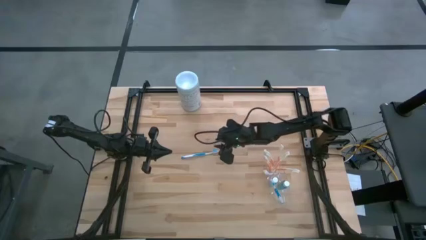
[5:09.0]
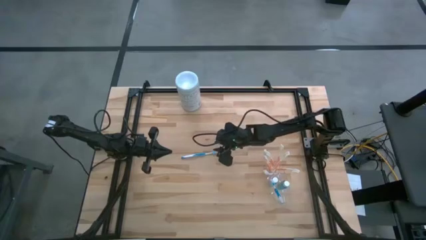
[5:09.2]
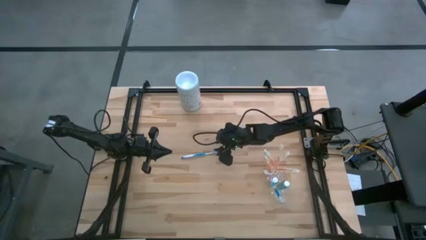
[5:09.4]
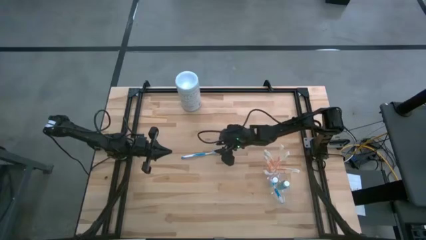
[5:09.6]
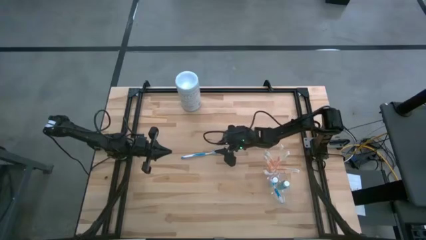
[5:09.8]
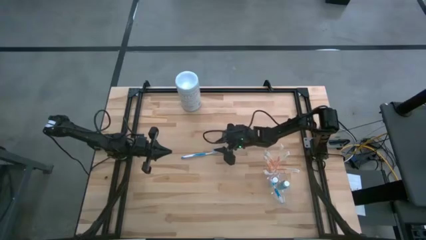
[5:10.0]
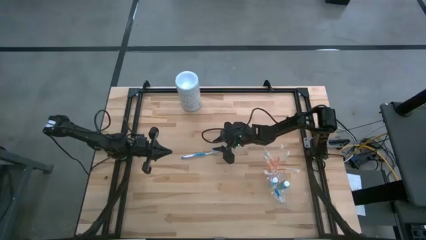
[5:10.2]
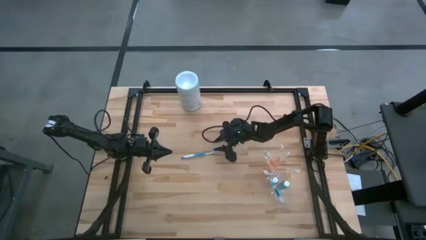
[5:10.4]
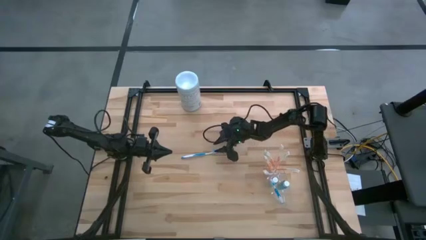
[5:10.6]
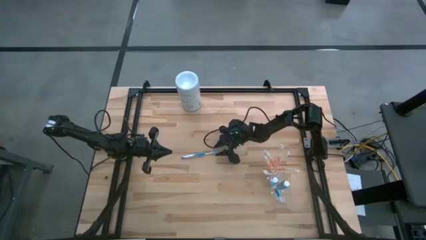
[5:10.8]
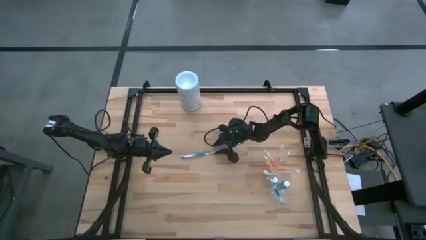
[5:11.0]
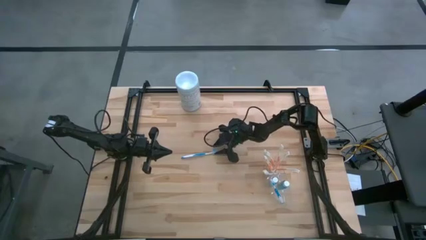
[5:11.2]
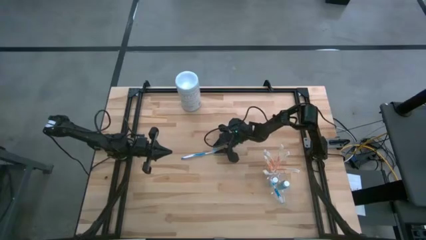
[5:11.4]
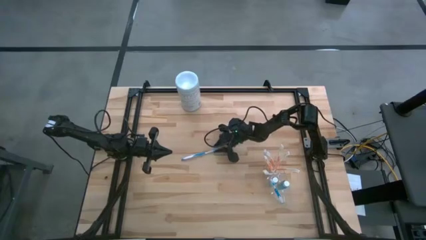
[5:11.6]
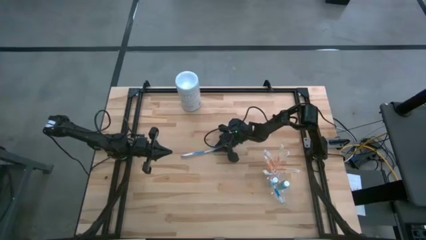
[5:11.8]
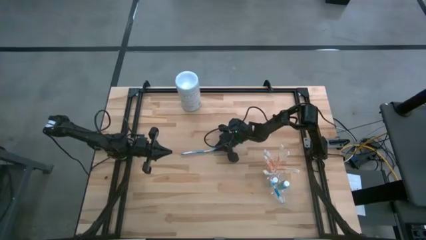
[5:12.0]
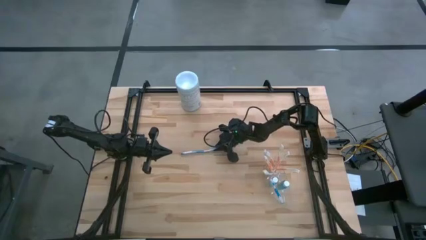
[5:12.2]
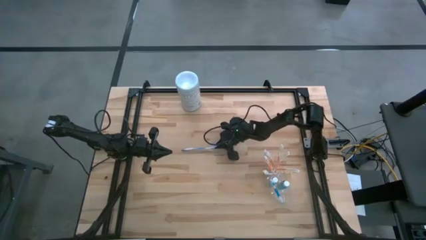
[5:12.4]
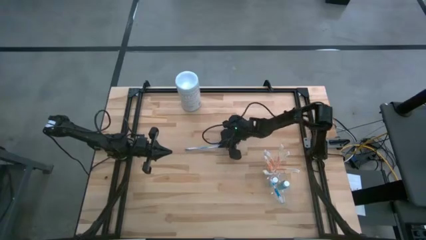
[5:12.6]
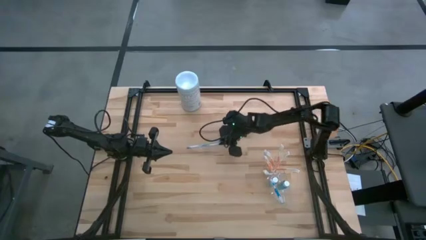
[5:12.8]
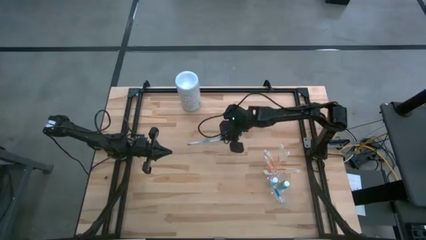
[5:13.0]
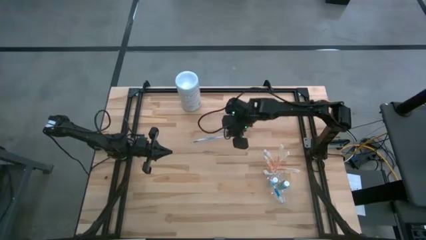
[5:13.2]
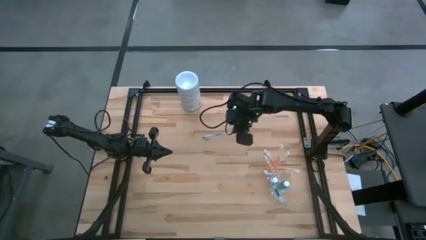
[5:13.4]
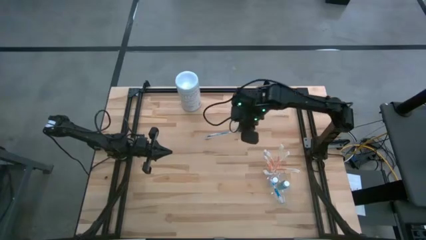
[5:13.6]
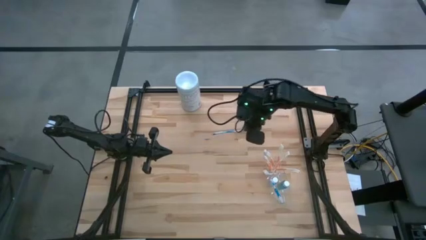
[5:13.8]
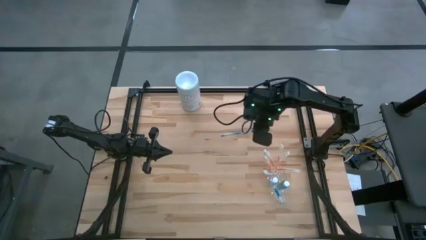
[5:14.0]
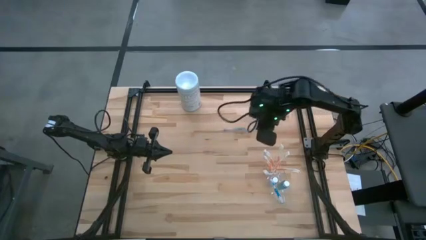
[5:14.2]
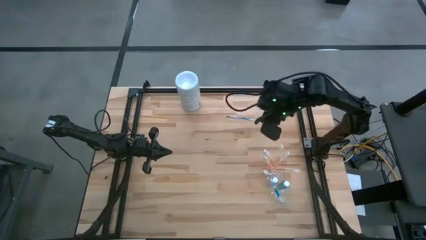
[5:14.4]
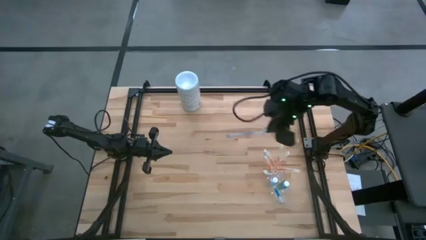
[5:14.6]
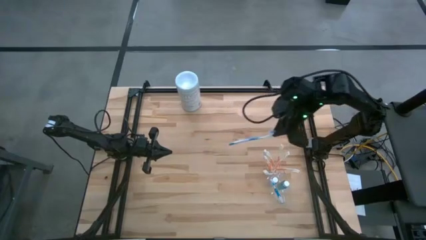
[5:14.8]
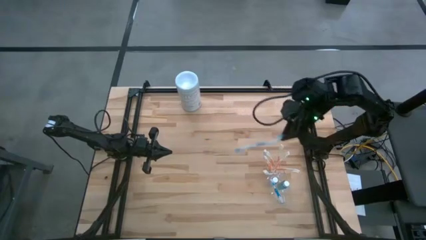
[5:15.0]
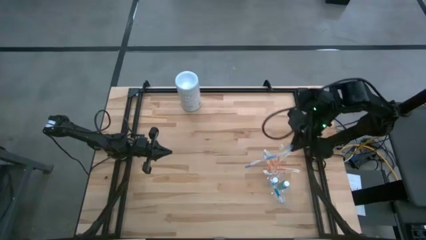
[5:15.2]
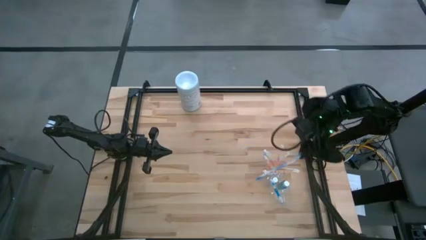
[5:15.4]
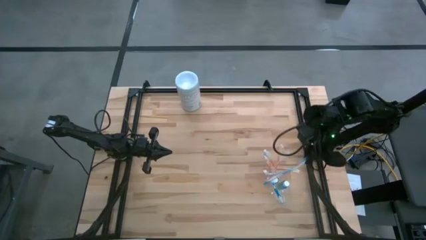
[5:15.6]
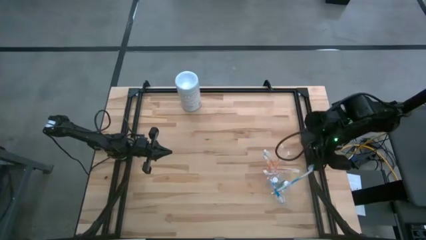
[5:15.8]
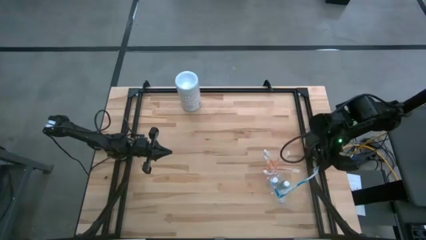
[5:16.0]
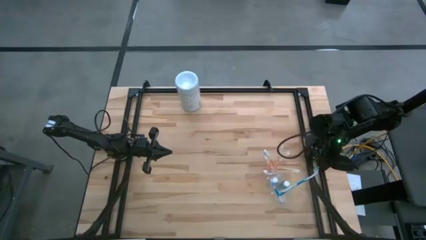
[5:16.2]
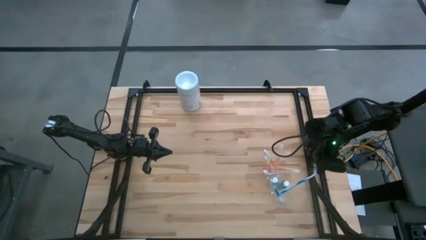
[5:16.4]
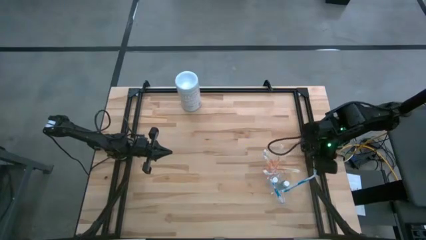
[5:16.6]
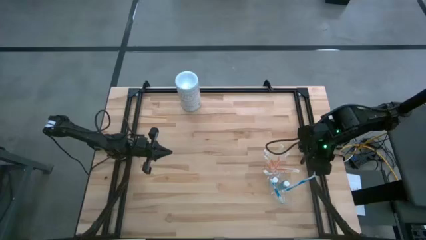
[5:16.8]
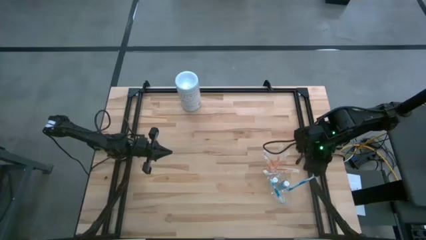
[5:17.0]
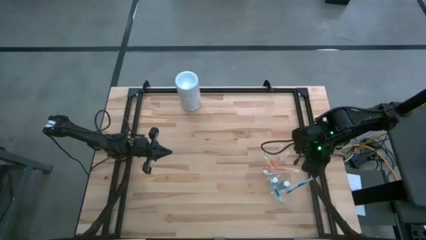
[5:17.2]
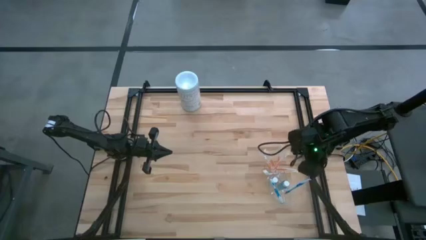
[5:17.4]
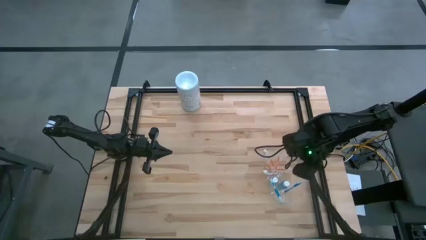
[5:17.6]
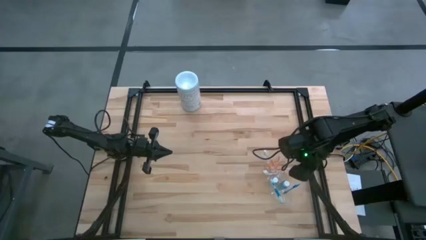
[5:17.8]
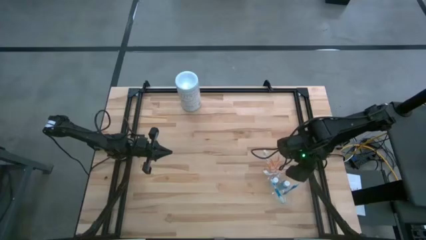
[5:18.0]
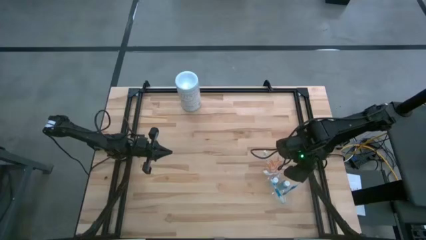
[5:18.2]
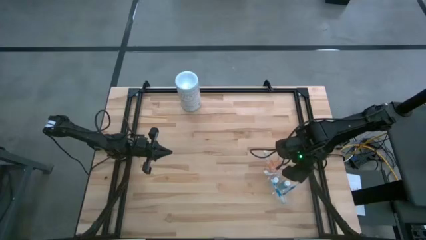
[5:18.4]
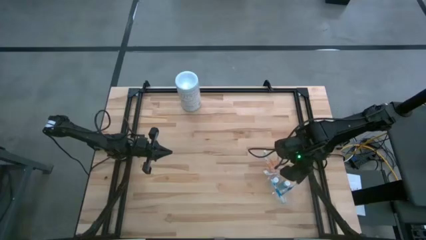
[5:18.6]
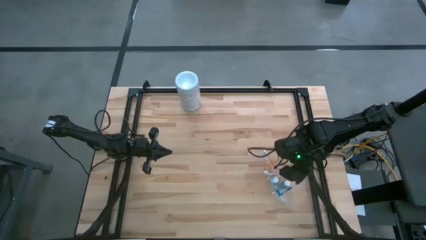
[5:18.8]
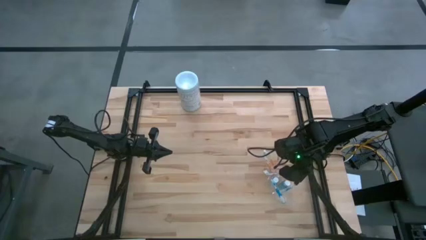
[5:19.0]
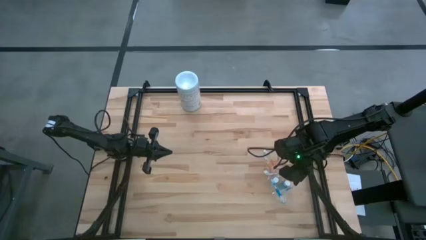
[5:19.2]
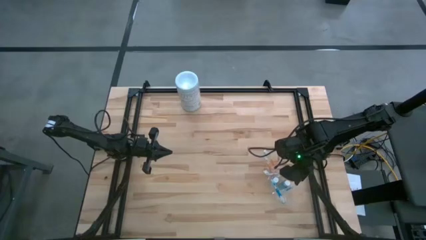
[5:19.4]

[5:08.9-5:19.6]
Task: Pick & Place toothbrushing station
Put the blue toothbrush into the bottom section of the transparent organizer

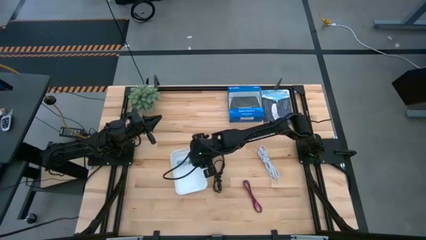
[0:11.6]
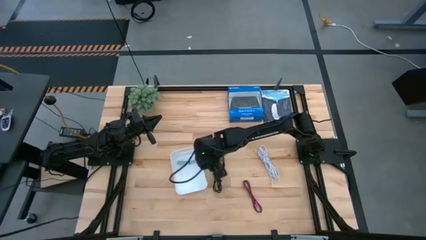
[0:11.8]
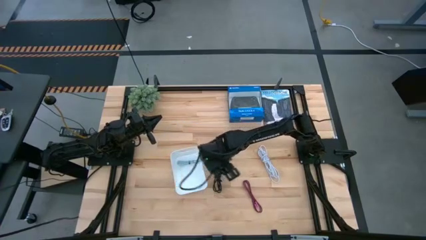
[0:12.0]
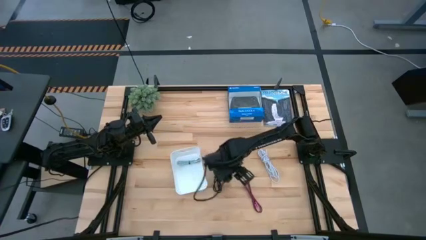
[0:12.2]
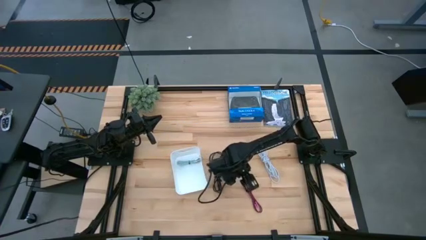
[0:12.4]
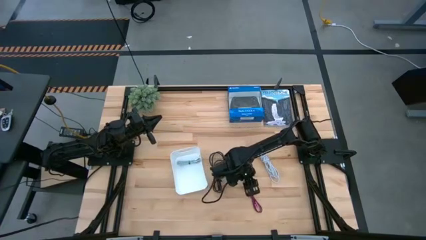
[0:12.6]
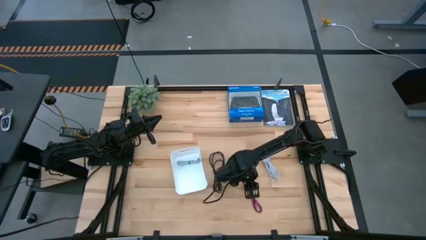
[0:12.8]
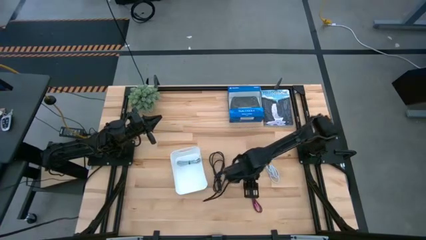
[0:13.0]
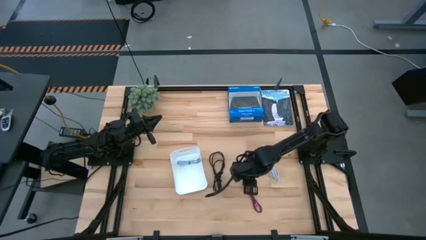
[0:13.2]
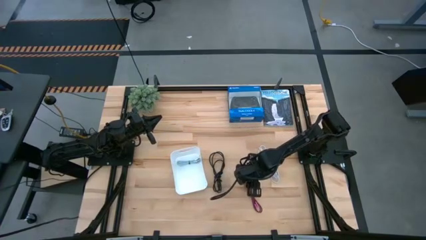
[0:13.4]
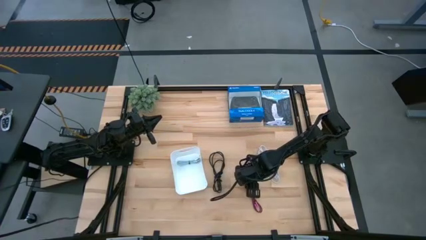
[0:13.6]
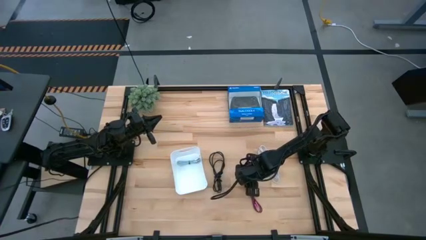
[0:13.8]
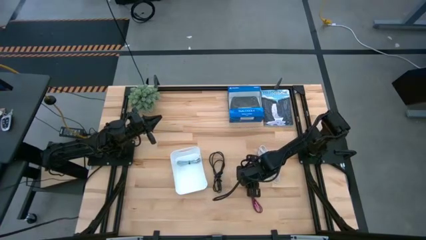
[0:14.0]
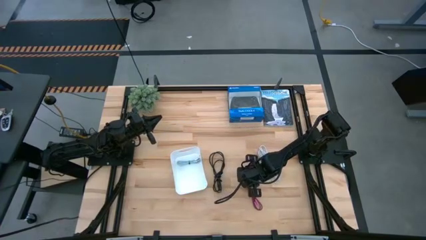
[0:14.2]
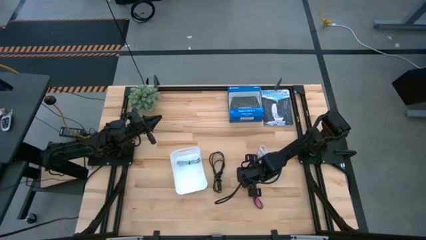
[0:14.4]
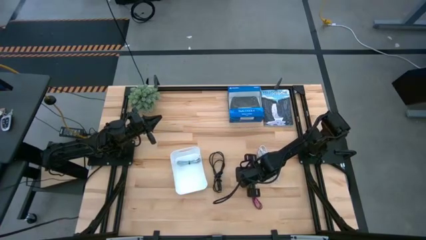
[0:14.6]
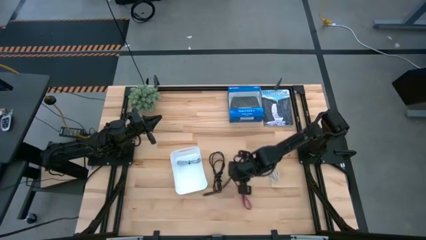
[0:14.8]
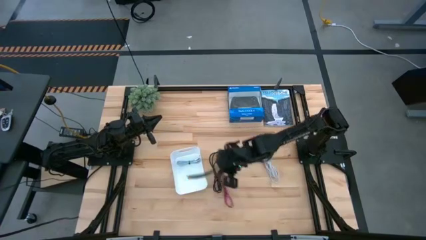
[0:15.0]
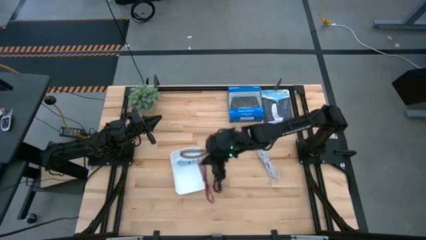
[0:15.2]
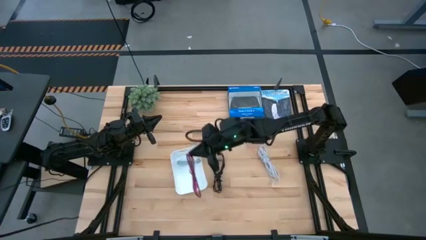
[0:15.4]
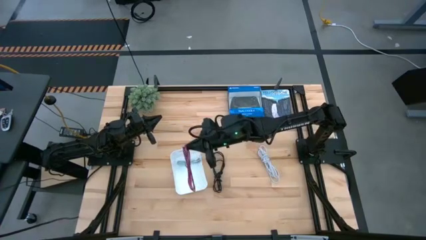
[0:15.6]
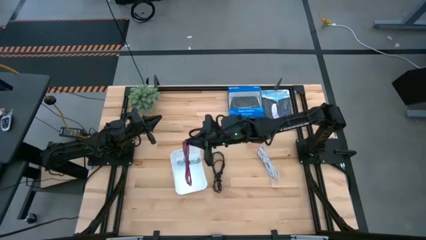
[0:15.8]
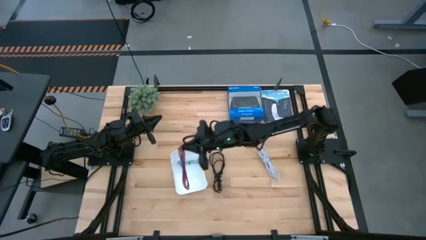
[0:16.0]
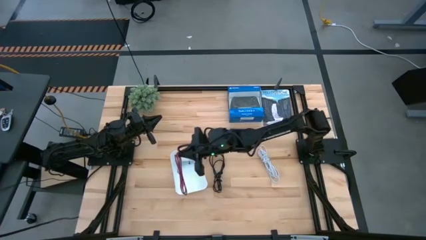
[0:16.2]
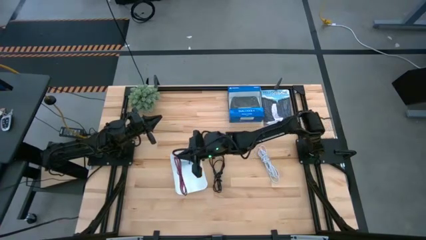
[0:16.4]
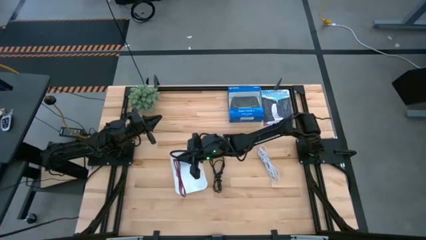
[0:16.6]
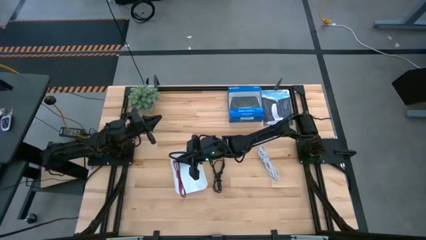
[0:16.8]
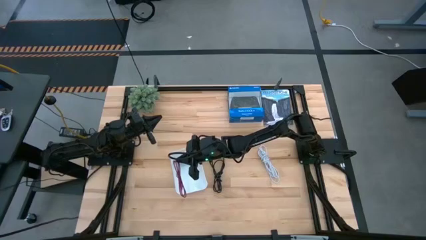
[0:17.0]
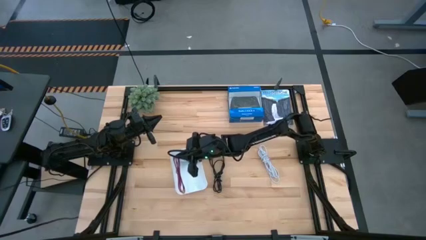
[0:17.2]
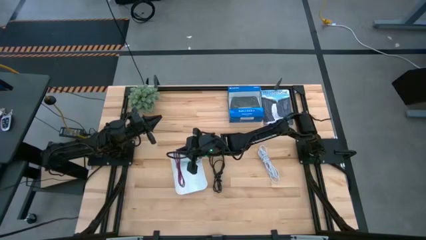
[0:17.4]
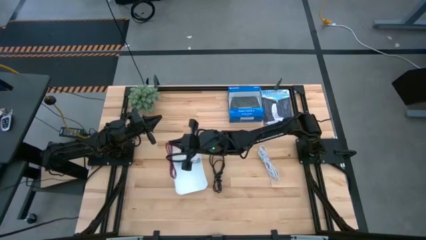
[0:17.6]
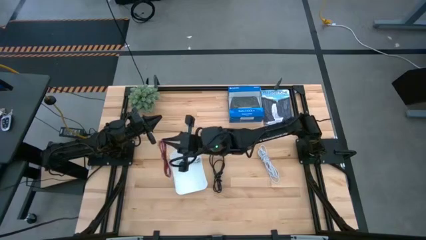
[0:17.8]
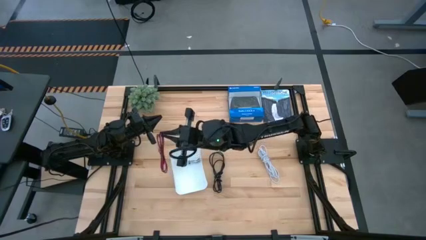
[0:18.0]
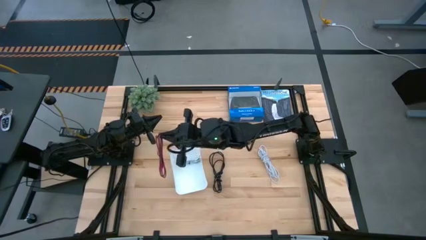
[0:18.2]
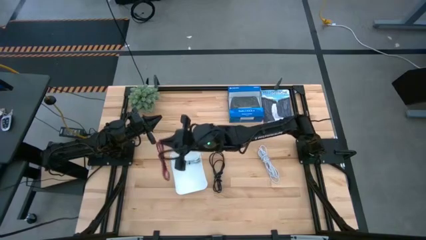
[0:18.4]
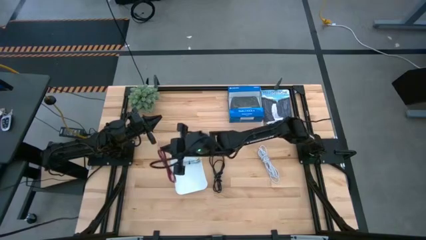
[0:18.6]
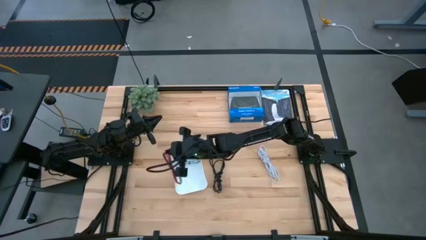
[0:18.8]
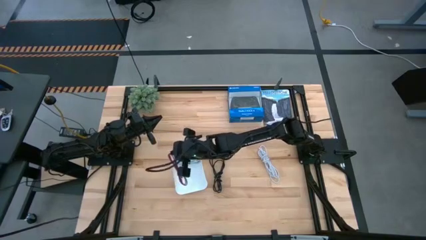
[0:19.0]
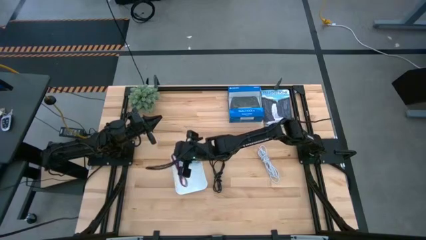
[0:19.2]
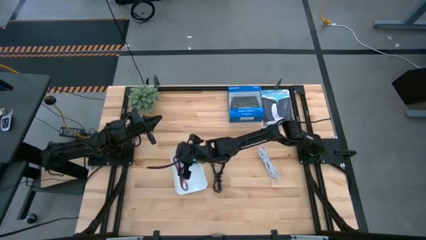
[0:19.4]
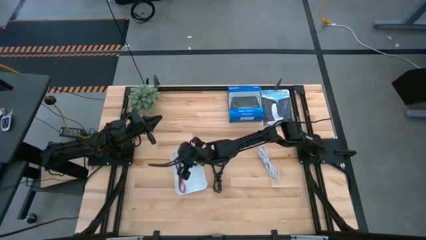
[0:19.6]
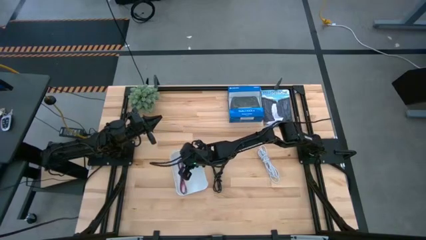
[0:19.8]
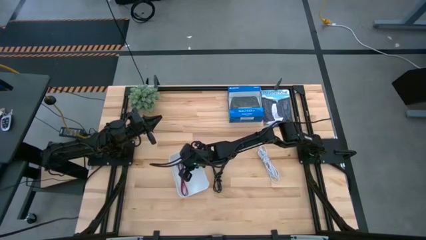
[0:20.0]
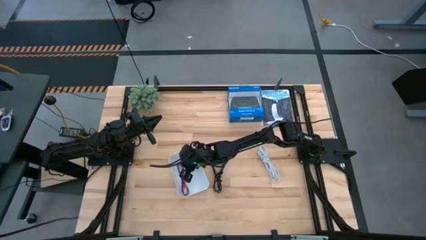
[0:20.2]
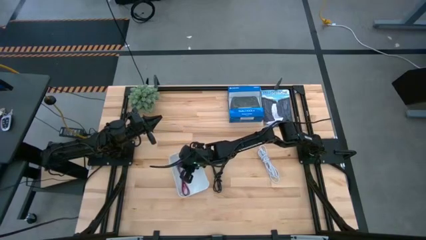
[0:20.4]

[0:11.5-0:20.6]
Task: Pick and place USB-C Cables
Put the red charger cable into the white bin
